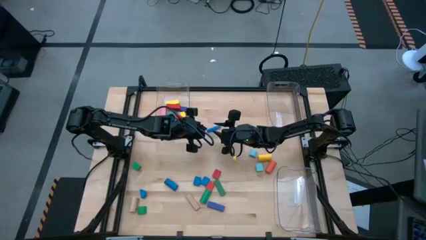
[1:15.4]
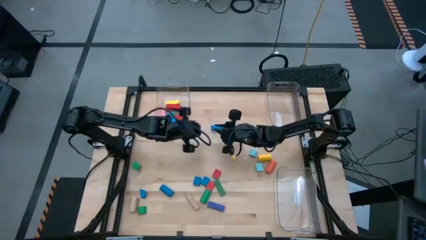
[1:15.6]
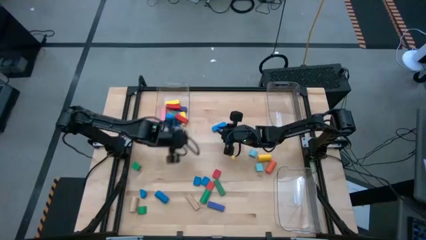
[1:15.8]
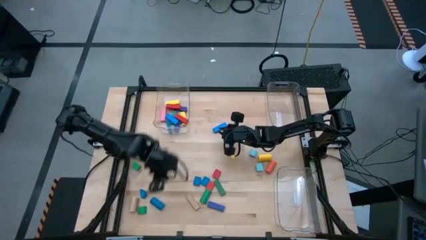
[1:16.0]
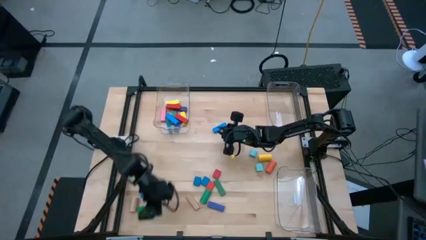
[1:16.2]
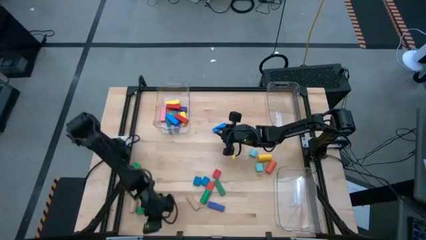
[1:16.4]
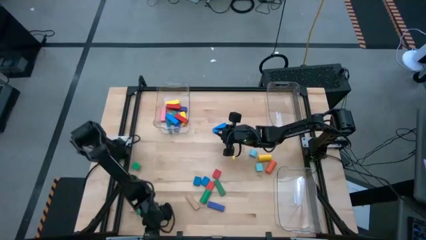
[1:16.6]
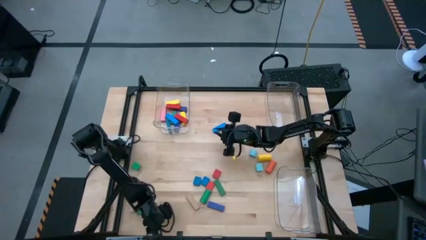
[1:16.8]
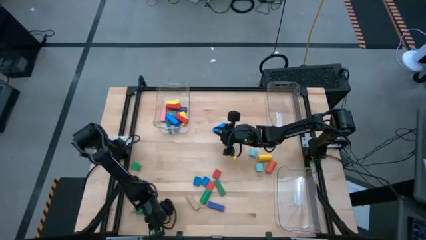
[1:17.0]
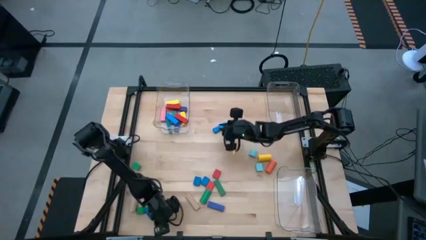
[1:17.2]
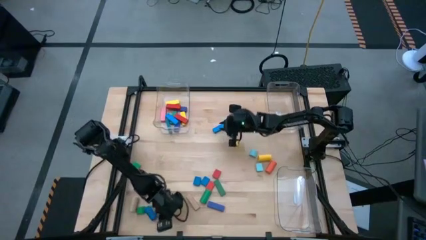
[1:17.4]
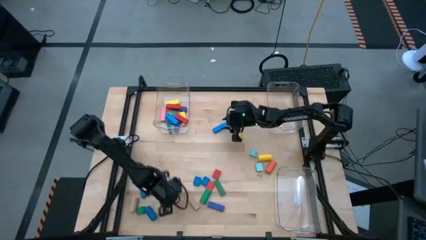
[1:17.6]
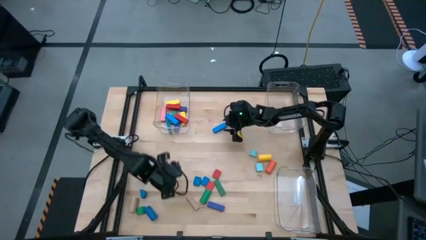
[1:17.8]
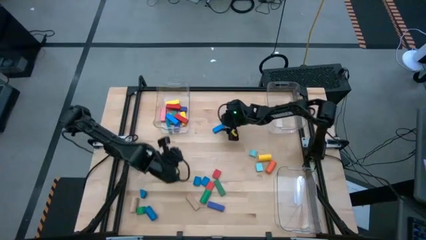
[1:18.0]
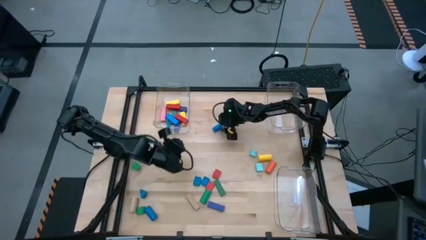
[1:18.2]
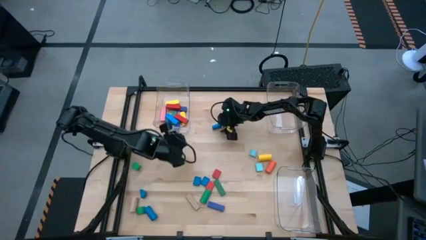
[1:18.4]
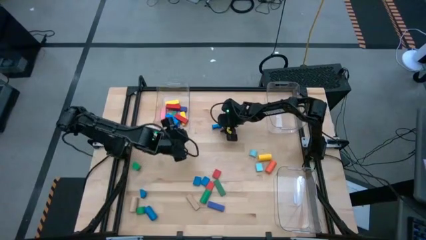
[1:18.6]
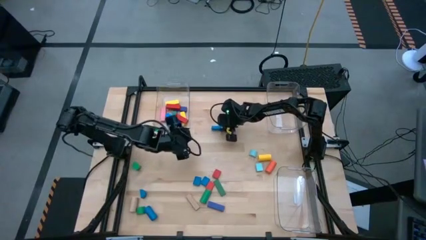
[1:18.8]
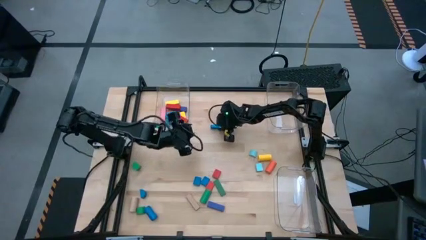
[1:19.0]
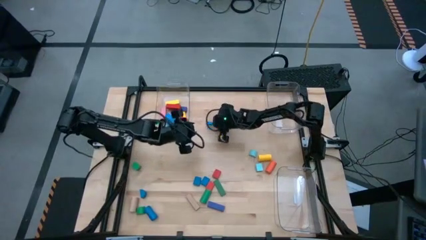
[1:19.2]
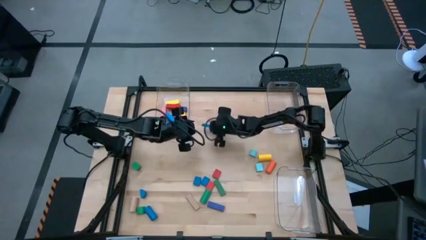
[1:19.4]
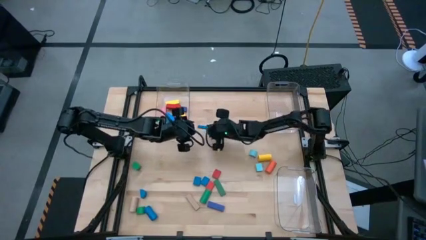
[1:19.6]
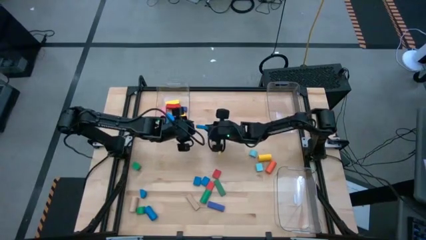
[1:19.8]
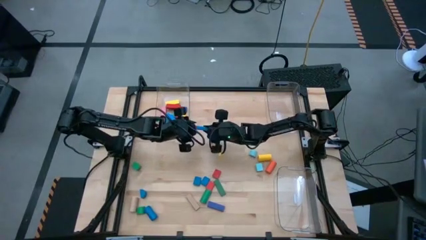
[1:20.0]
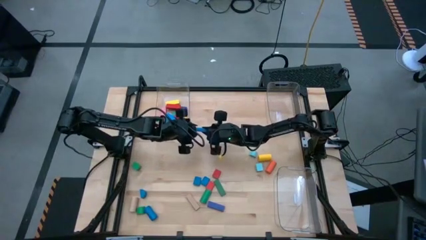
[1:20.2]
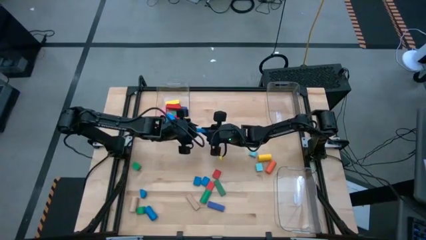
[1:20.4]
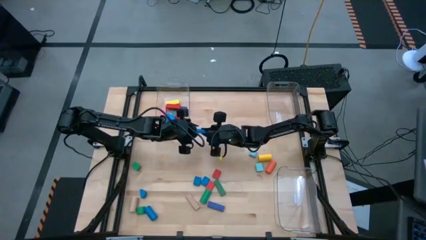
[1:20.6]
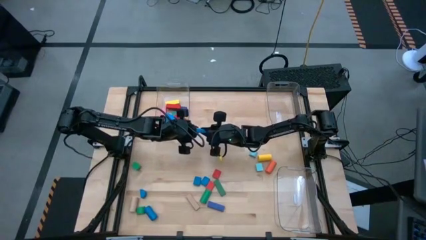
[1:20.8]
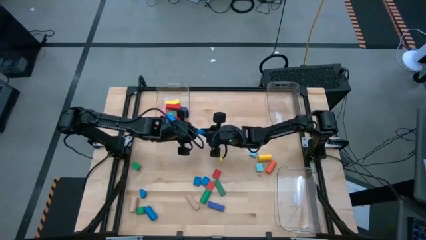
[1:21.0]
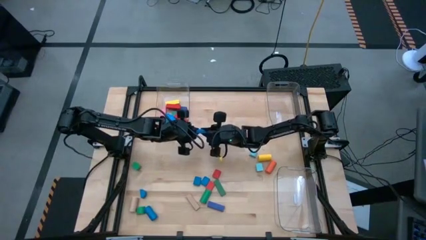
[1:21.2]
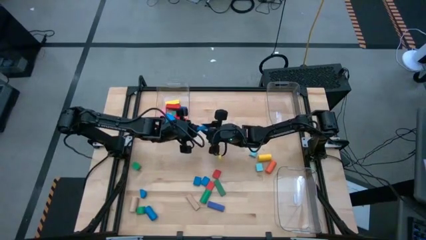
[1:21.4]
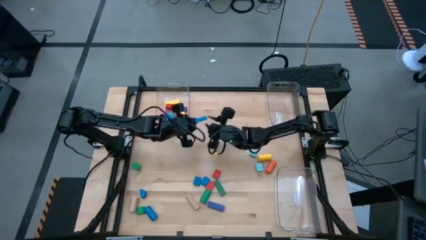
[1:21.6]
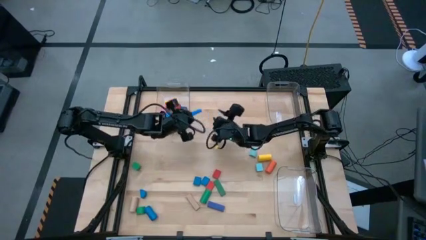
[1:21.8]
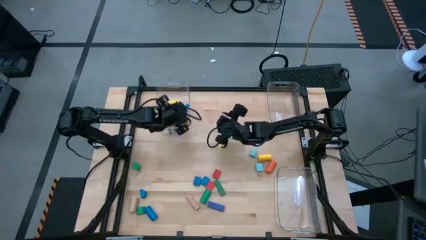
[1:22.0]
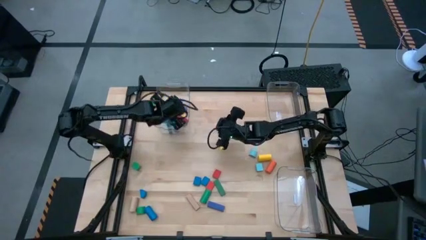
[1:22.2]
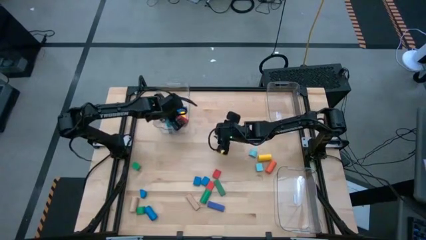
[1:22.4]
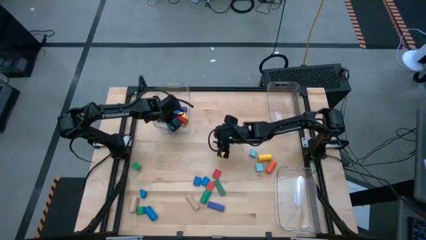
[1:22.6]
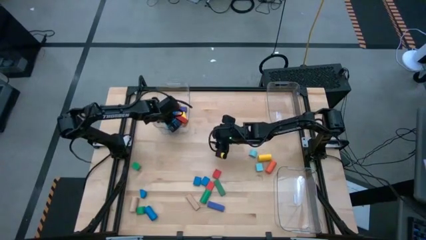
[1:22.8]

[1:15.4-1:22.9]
Task: Sort blocks by size
Put the blue rectangle block into the top left transparent bin

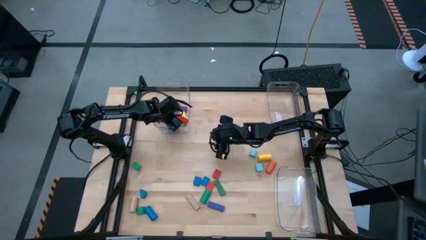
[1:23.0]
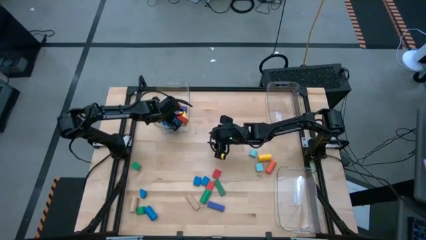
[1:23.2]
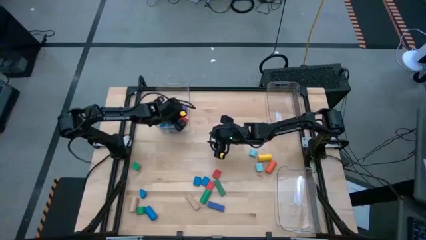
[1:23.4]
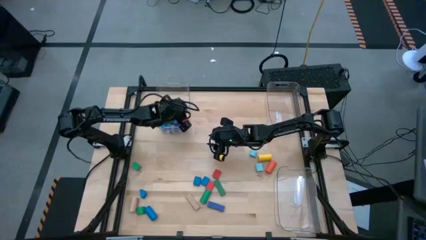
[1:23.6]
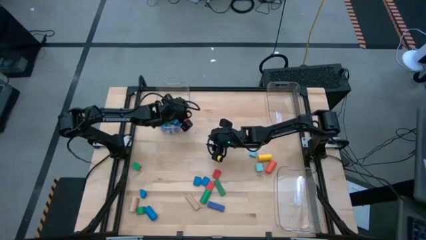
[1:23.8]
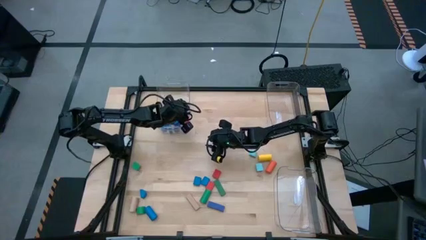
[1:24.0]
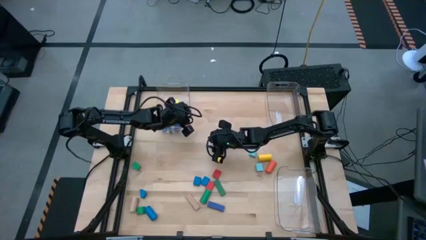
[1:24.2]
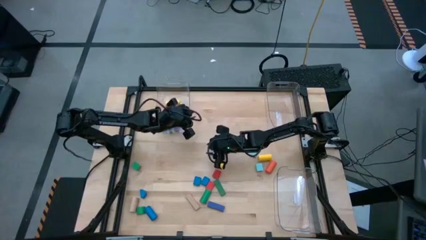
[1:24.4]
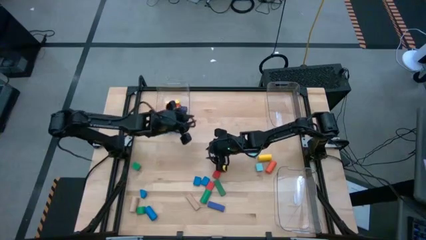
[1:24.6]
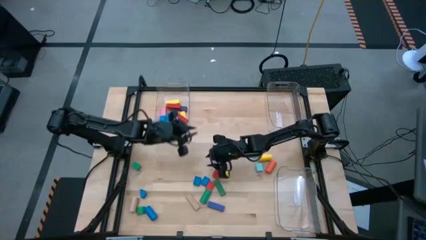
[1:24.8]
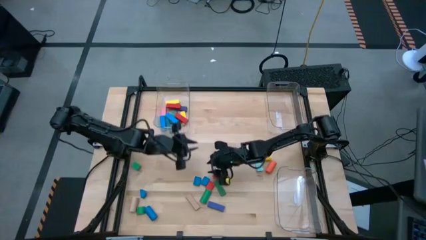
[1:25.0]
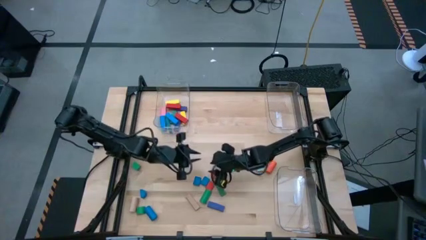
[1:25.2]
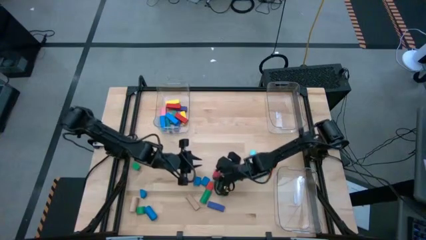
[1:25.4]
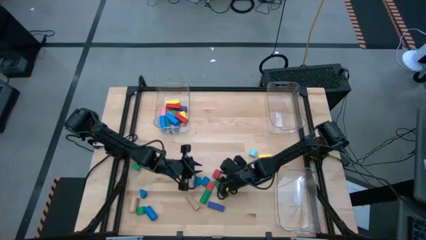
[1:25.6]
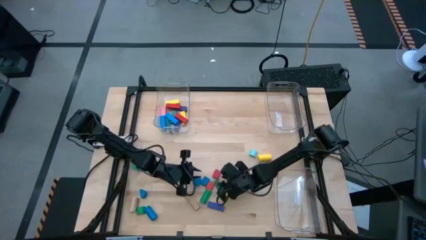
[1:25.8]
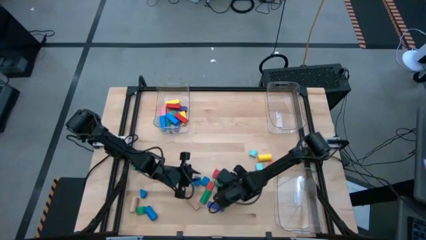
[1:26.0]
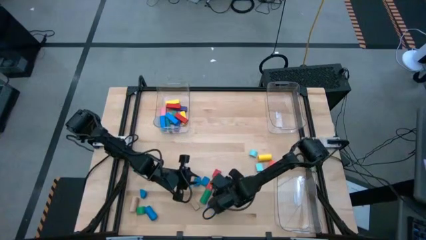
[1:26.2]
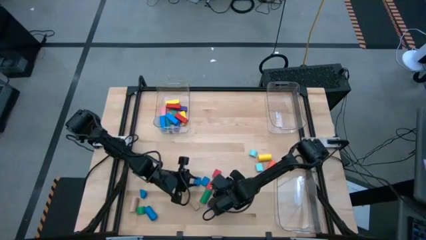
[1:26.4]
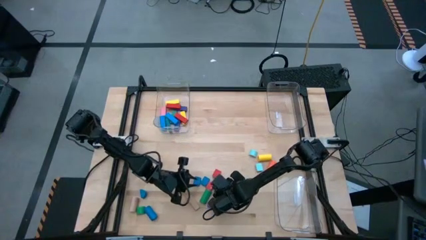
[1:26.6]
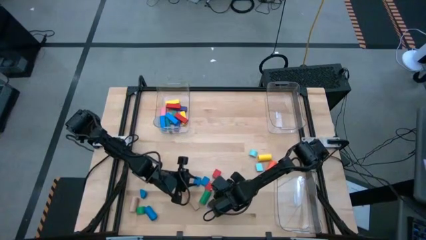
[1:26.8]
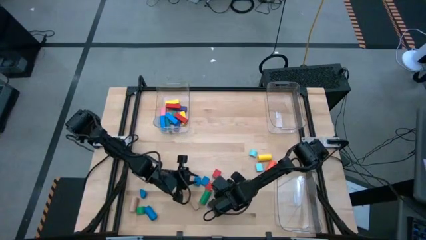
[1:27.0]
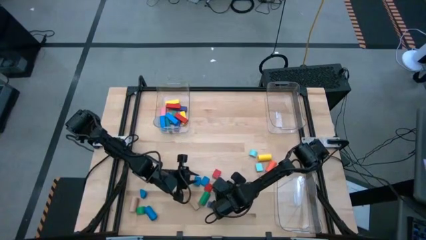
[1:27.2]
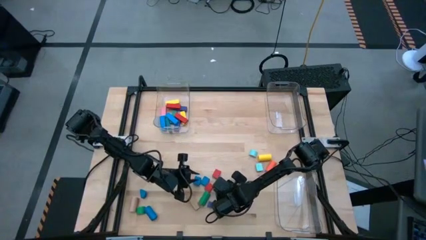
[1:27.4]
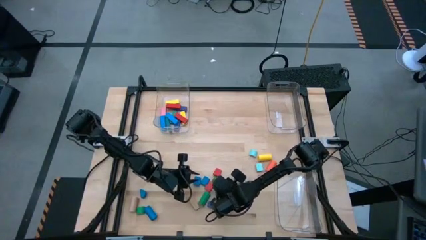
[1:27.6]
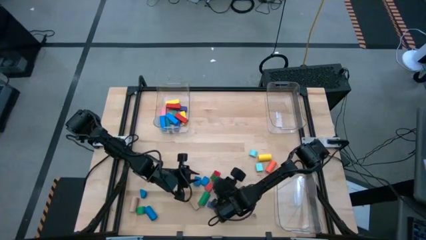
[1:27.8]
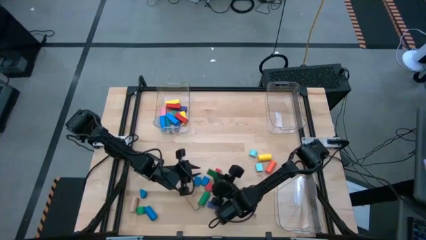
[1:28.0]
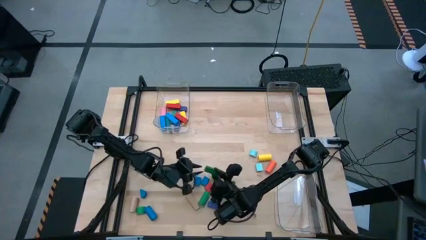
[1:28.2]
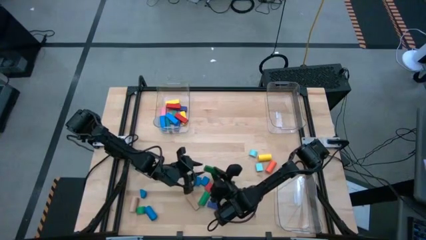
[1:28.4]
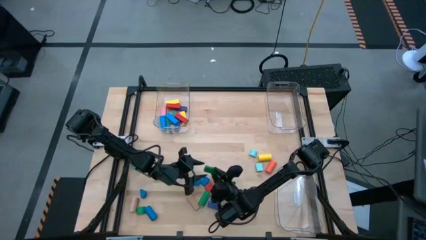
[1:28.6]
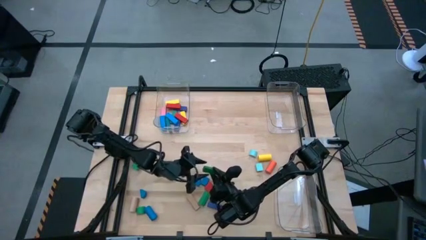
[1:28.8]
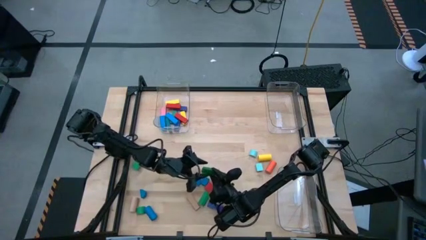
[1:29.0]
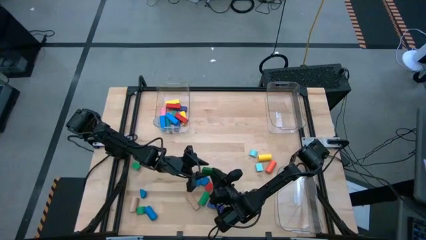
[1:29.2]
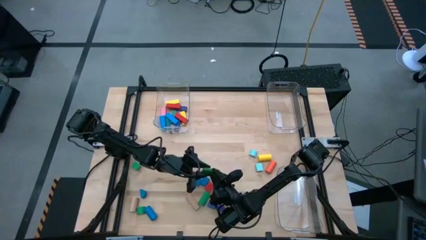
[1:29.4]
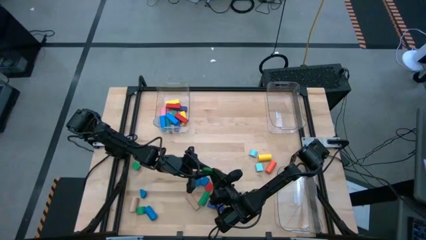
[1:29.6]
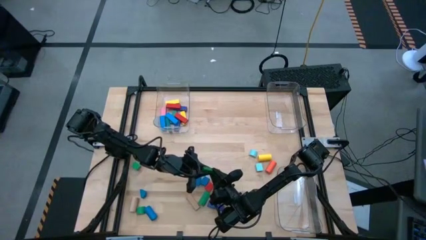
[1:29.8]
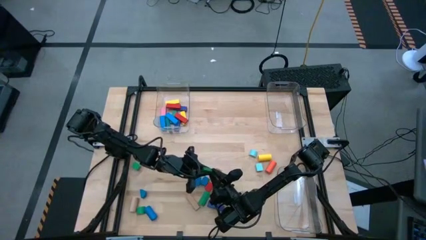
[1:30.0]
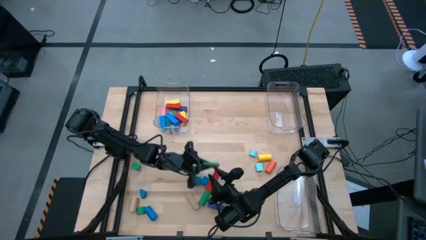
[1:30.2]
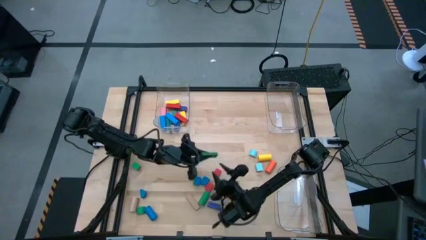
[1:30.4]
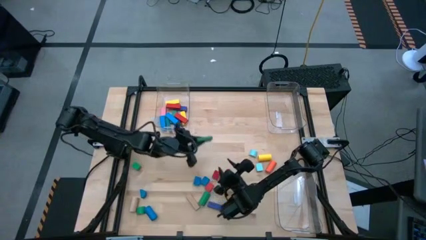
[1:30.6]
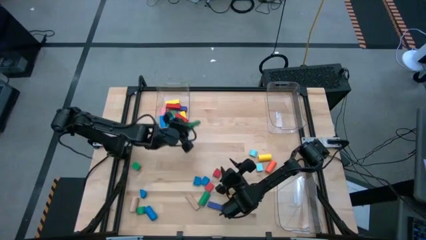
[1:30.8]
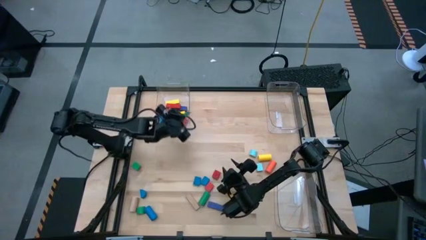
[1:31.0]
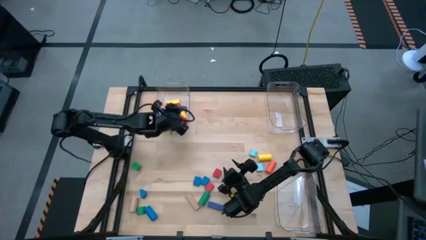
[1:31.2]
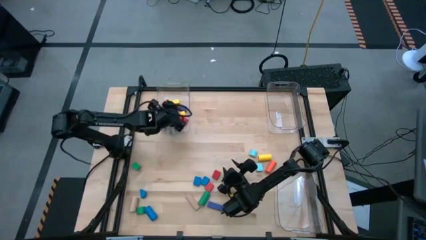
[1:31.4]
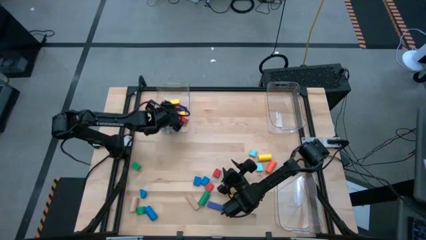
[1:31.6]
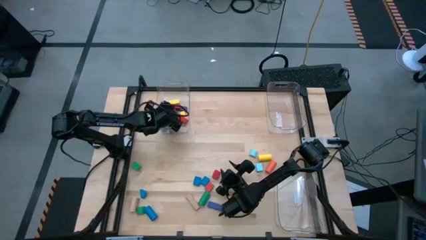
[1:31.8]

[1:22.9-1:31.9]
Put the green rectangle block into the top left transparent bin
